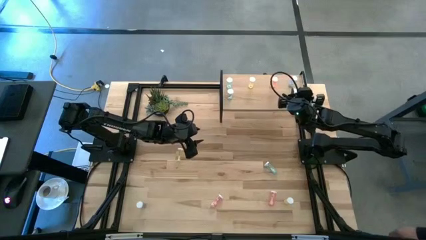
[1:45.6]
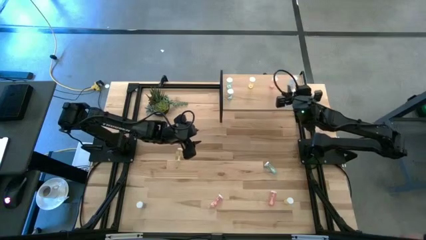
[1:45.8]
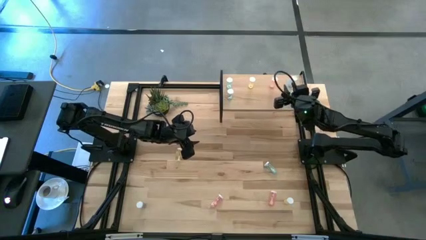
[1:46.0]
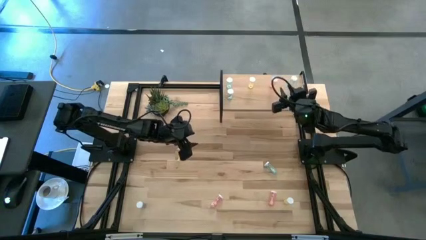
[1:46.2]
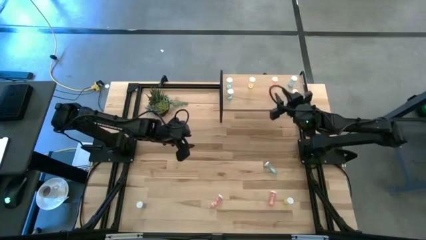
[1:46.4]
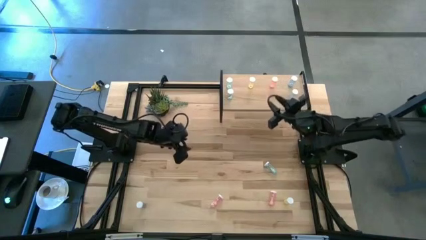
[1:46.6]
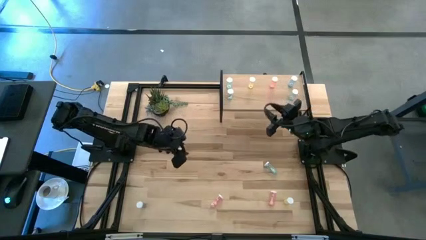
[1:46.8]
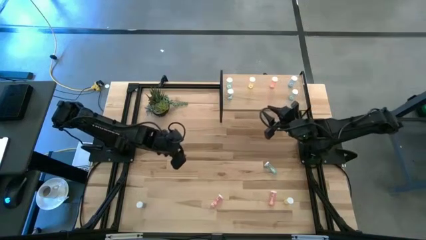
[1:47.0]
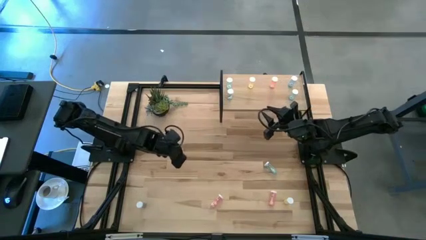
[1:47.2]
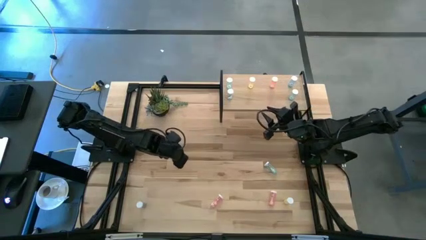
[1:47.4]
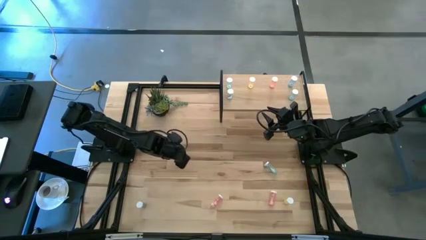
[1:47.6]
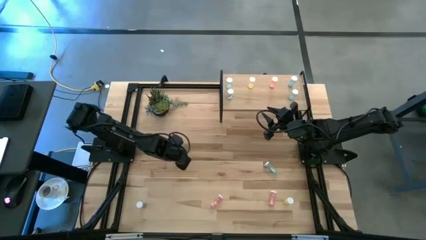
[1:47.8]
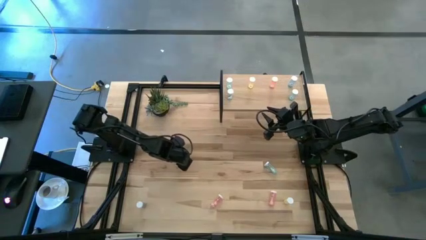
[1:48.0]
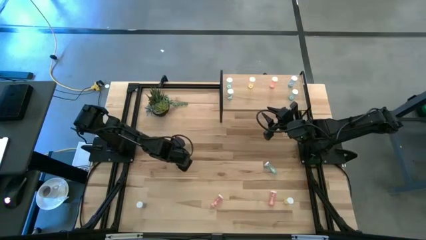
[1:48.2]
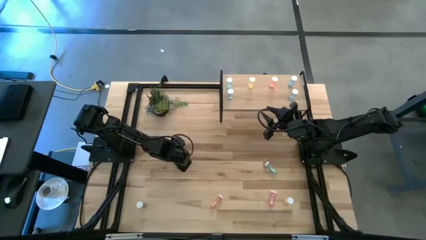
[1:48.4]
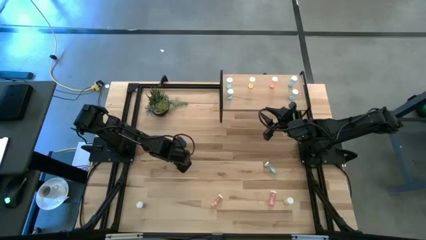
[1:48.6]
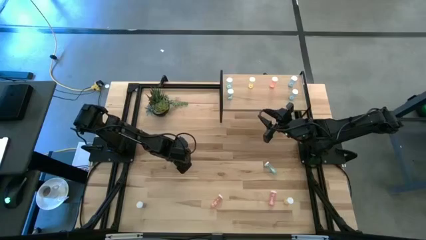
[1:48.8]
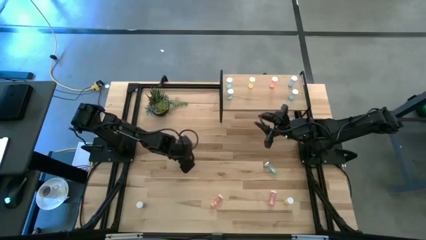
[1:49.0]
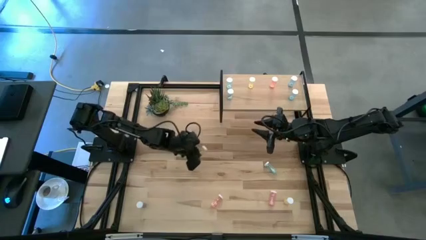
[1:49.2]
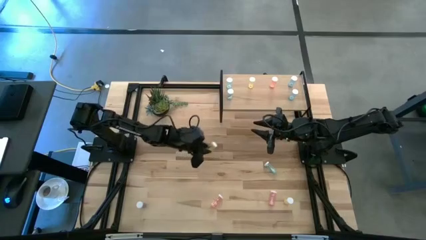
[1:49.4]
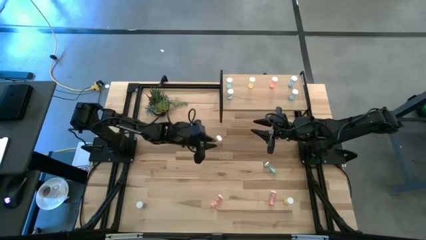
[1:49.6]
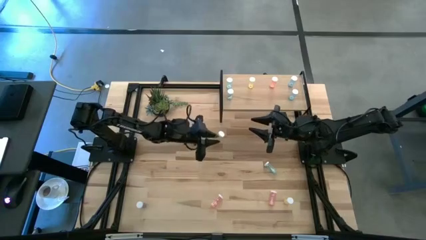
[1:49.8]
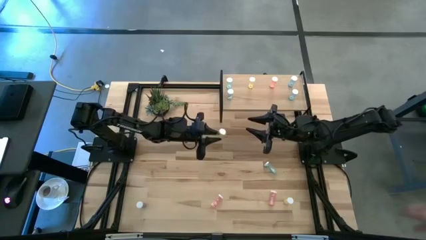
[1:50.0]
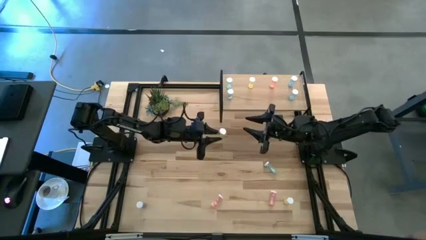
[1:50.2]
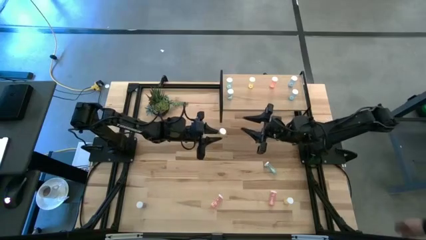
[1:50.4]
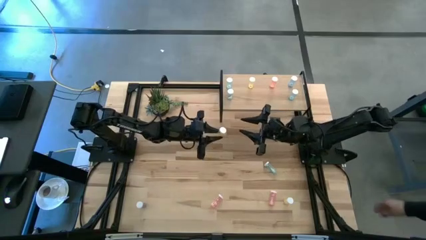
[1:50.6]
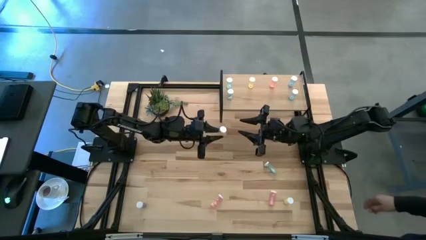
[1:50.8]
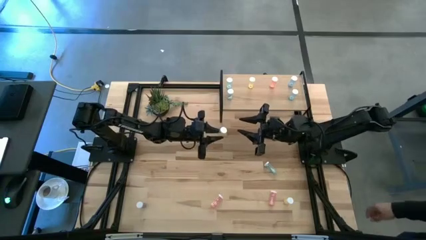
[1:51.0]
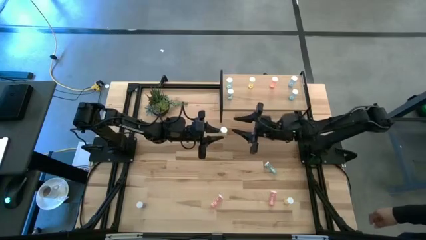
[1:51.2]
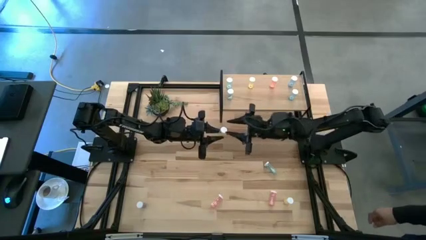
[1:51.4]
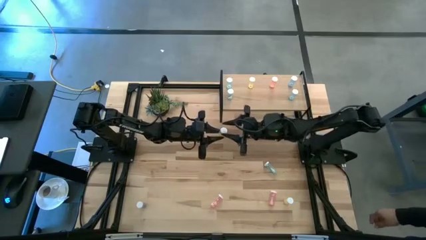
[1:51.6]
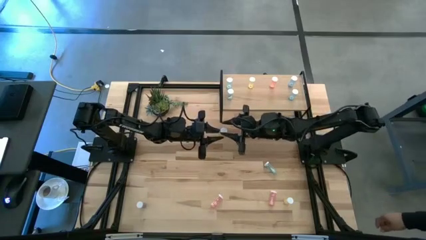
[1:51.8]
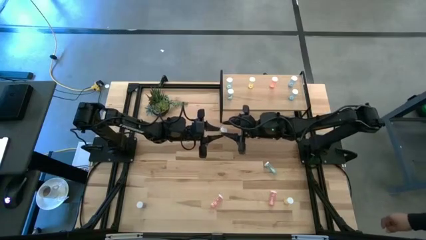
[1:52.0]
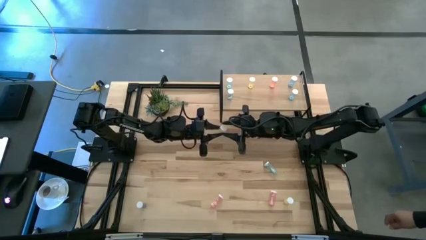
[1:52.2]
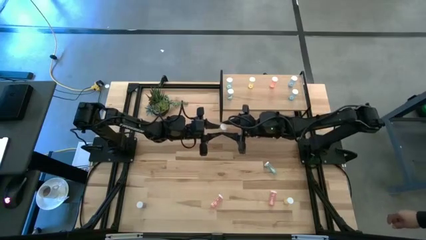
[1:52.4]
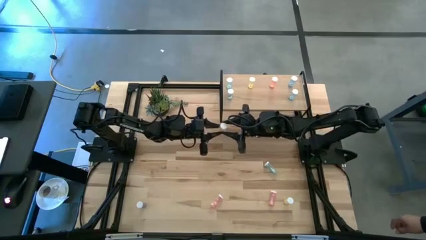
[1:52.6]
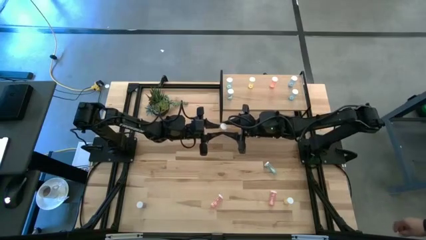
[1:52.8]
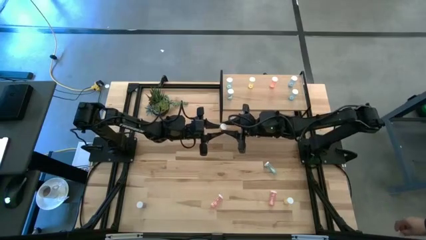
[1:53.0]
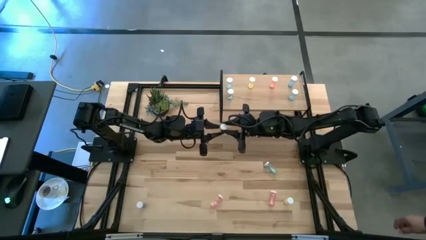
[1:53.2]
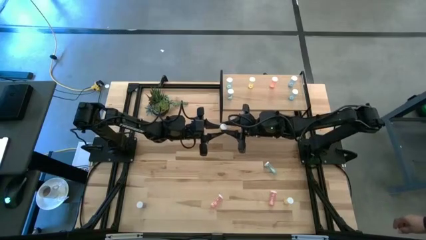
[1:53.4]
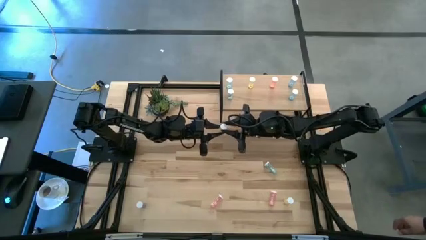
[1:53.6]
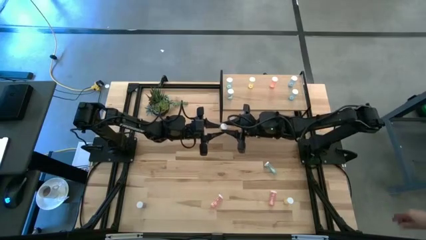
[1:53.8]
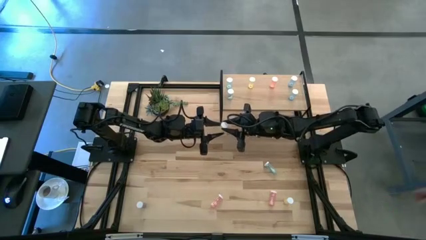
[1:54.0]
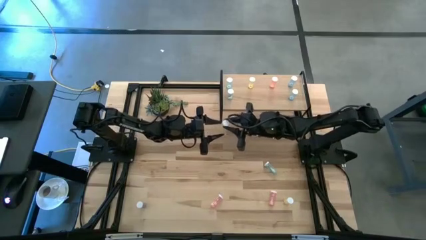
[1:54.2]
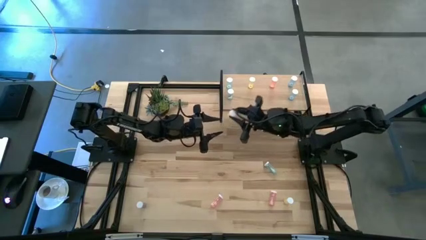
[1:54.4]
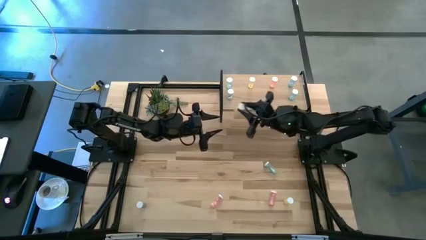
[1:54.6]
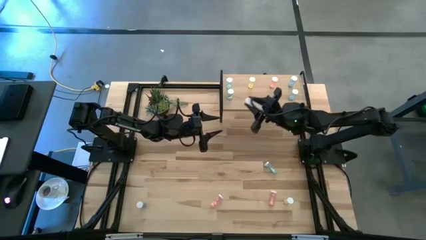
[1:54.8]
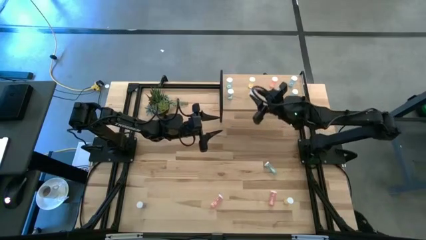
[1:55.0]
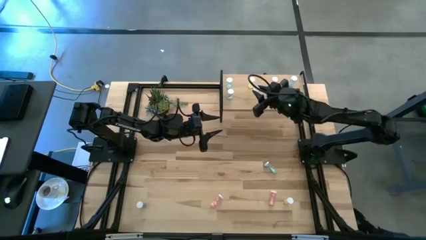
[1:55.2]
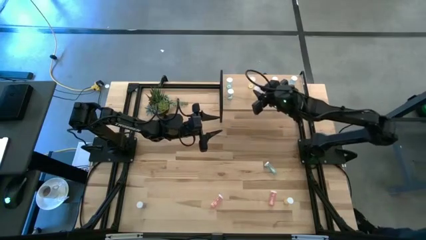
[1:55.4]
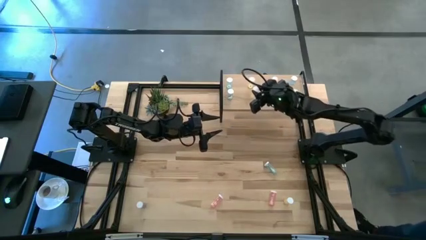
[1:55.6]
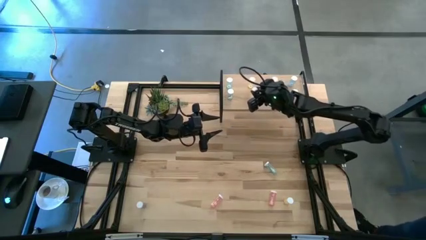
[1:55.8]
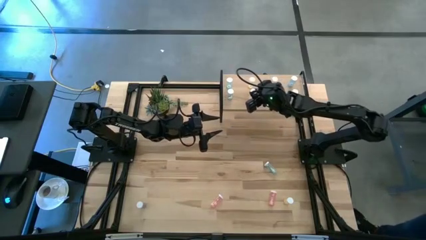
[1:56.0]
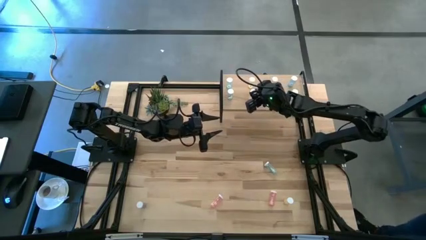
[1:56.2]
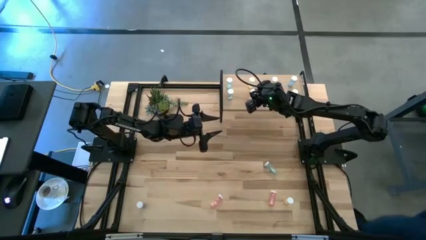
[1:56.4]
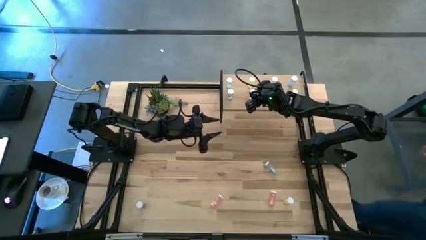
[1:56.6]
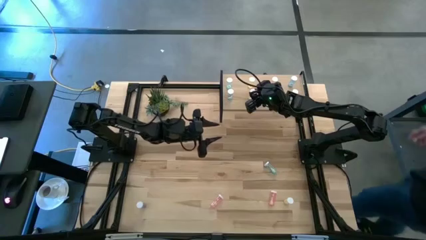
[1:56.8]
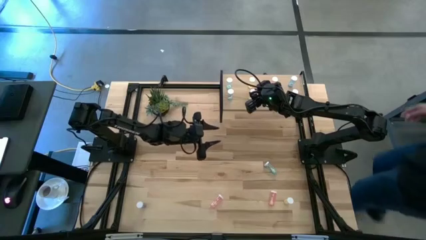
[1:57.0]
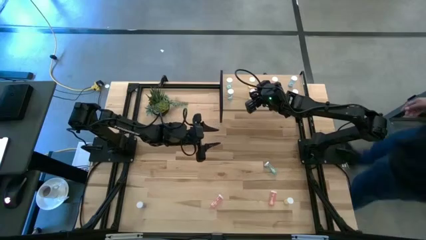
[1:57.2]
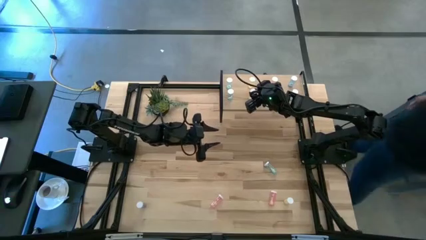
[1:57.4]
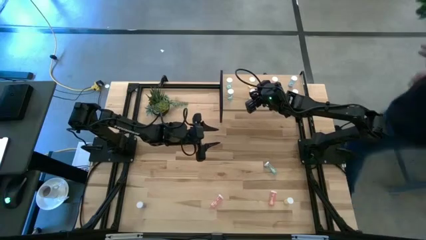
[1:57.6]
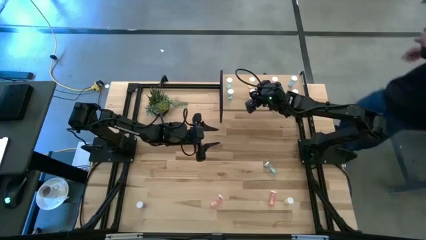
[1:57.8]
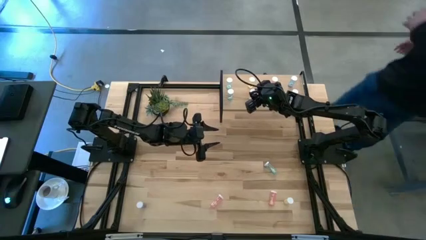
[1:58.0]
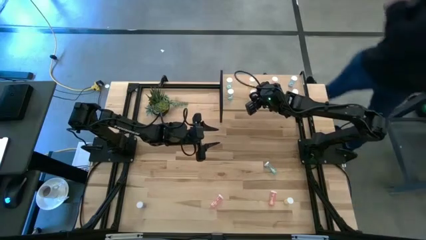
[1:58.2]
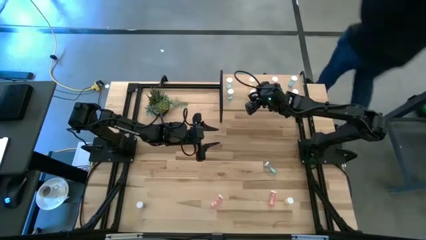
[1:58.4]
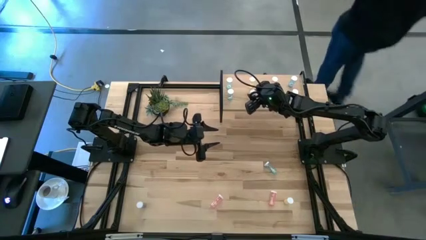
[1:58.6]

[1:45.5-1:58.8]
Task: Pick and place medicine bottles onto shelf by color
Put the yellow pill bottle aligned with the other yellow pill bottle on the shelf
